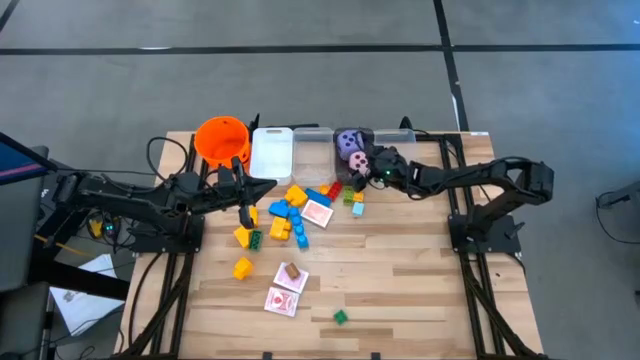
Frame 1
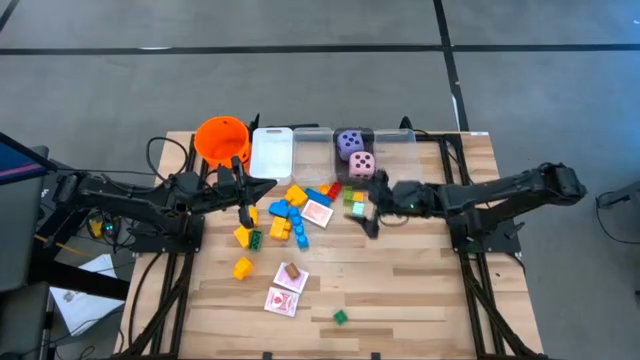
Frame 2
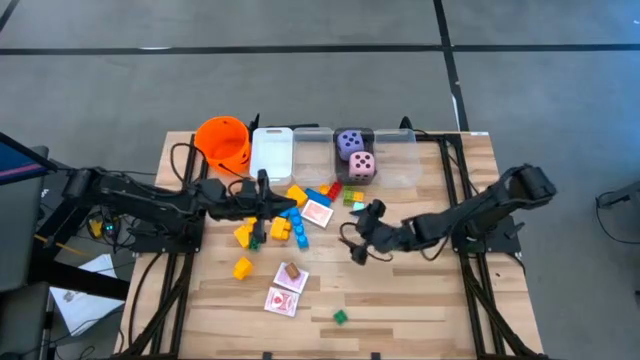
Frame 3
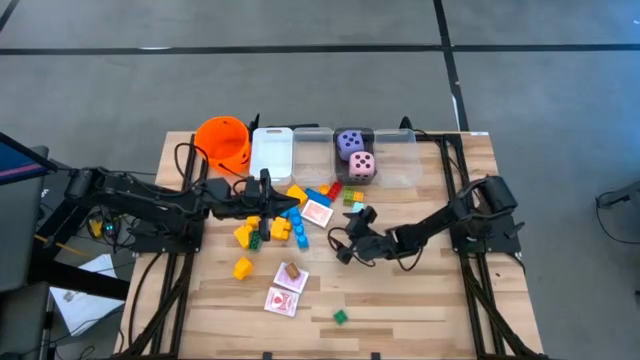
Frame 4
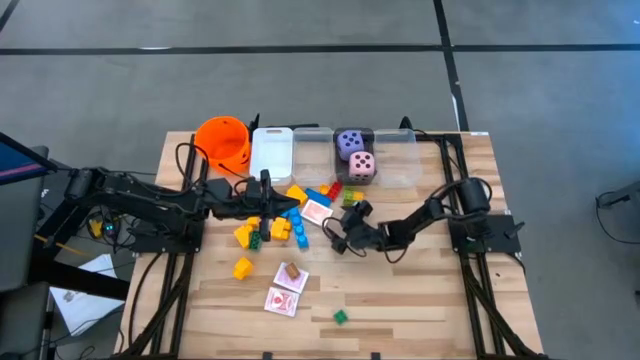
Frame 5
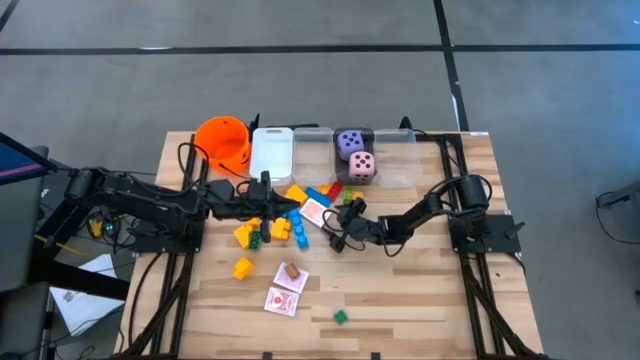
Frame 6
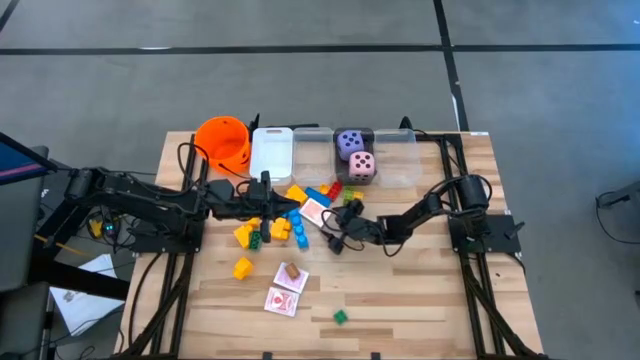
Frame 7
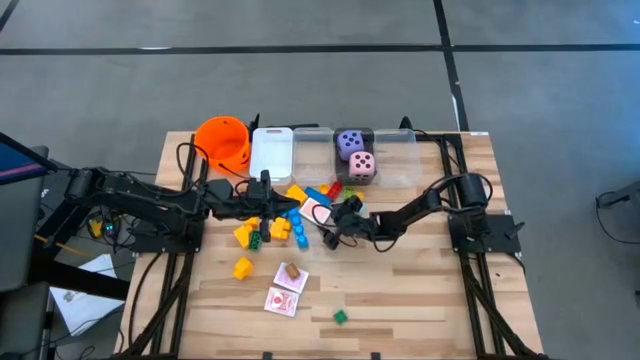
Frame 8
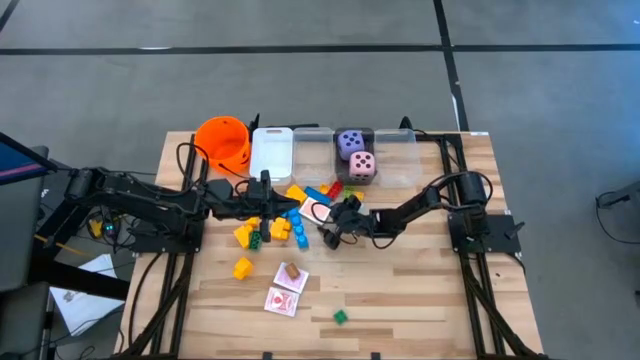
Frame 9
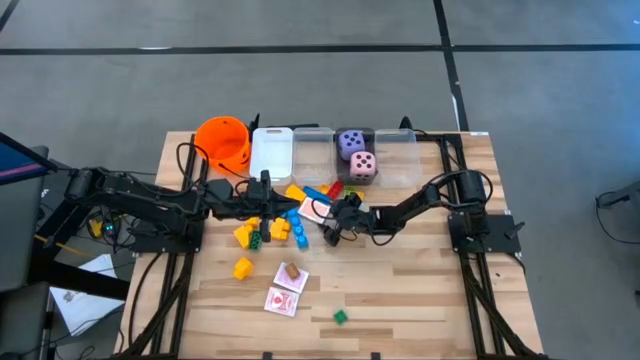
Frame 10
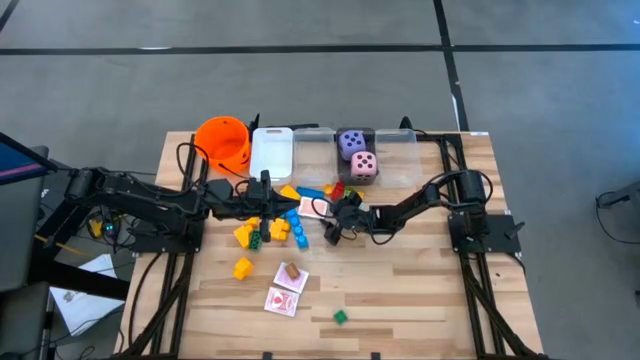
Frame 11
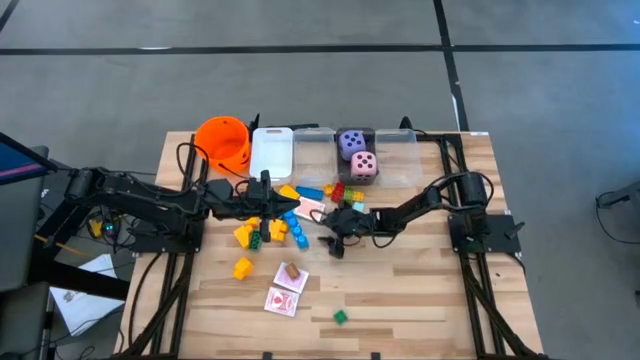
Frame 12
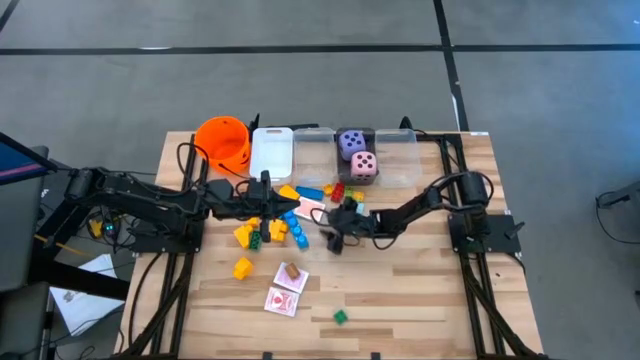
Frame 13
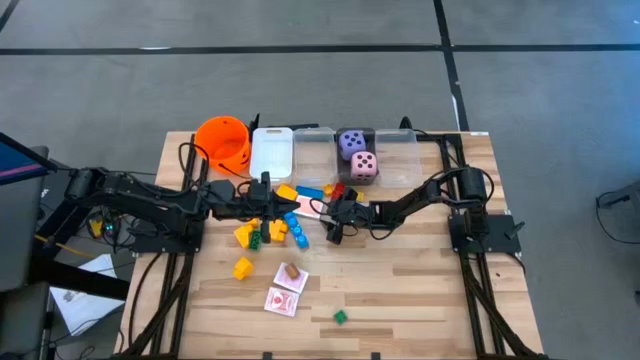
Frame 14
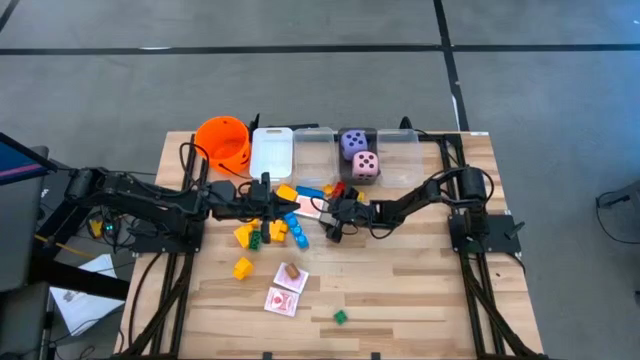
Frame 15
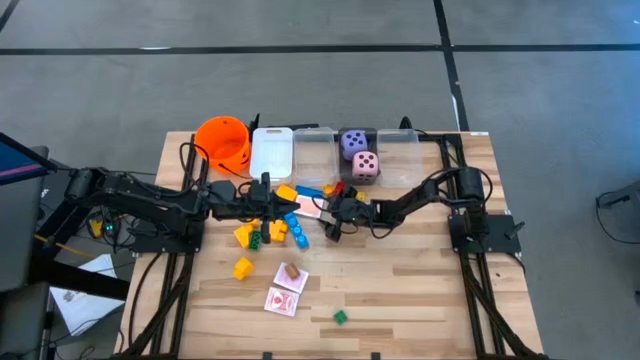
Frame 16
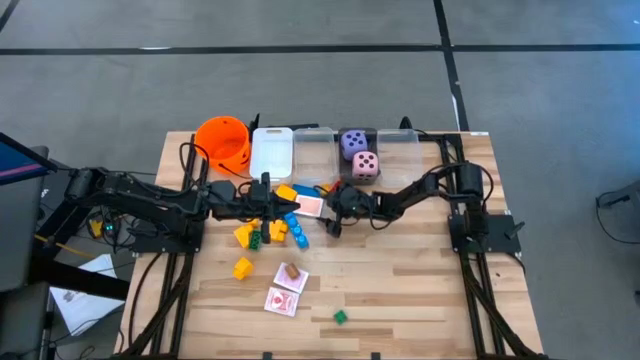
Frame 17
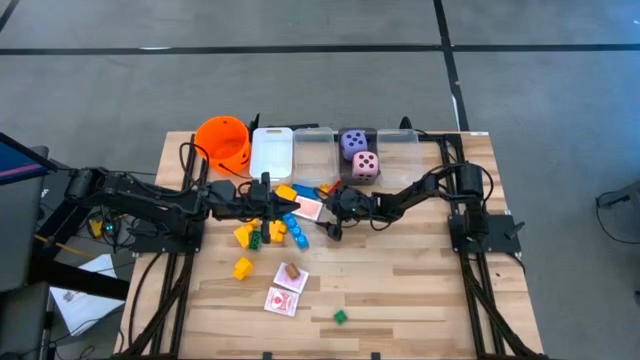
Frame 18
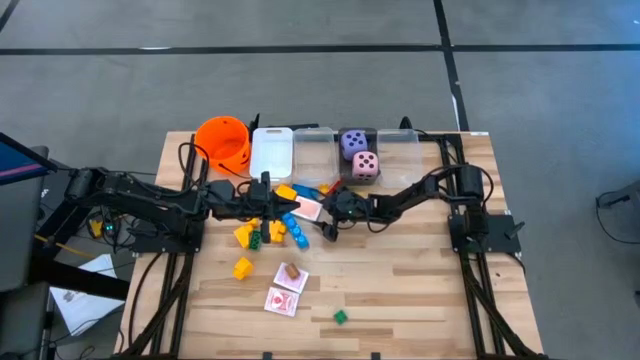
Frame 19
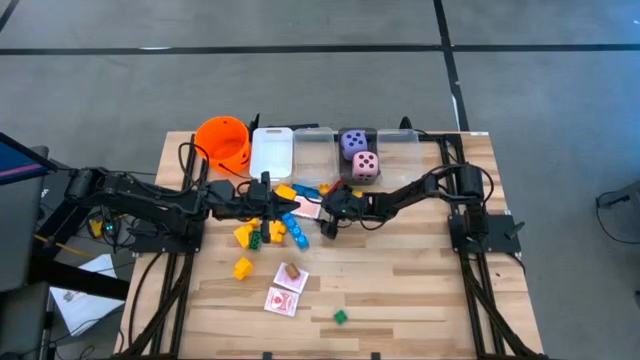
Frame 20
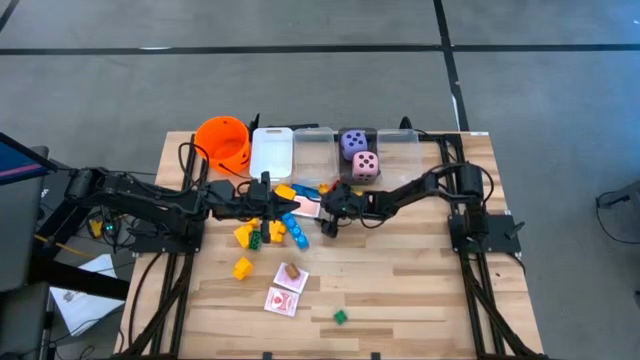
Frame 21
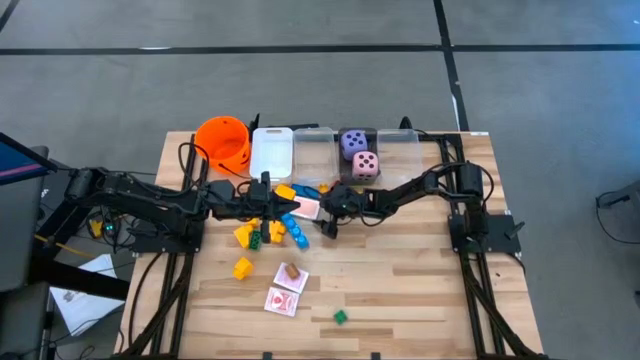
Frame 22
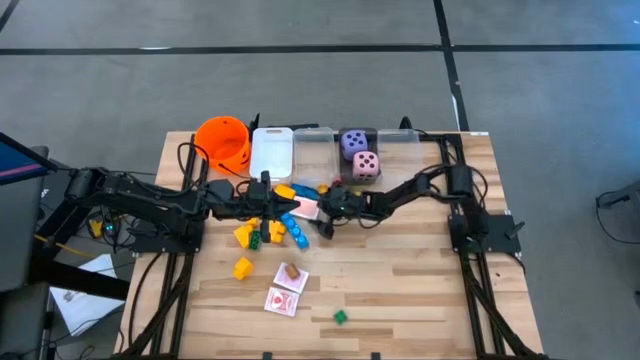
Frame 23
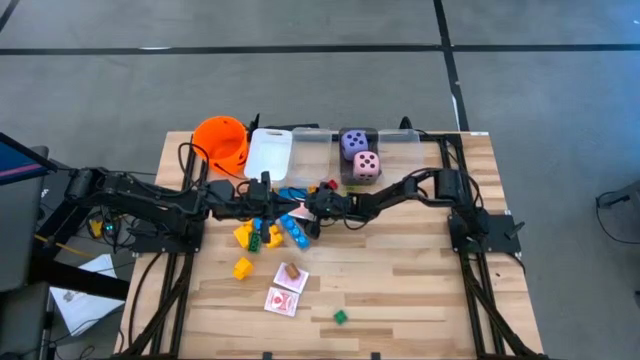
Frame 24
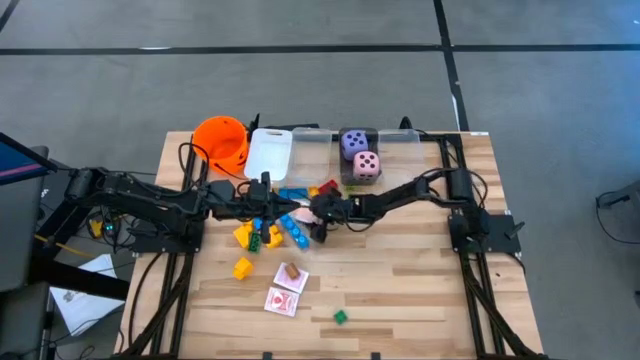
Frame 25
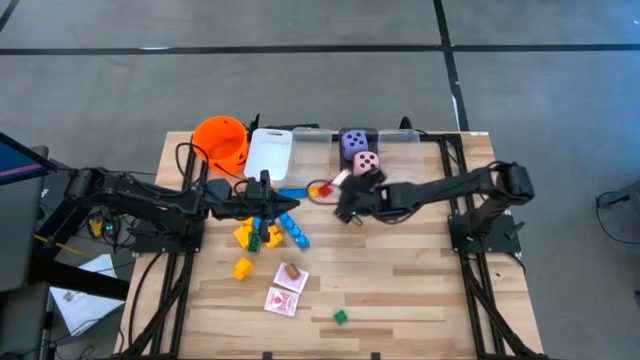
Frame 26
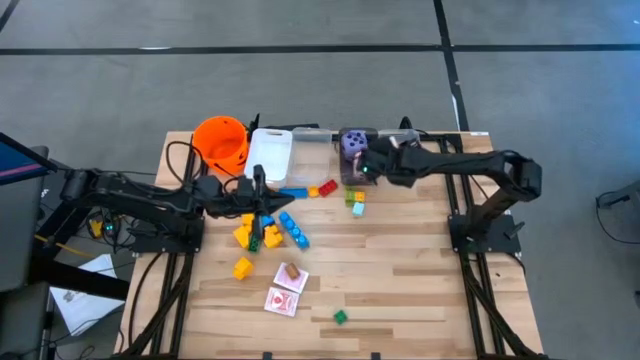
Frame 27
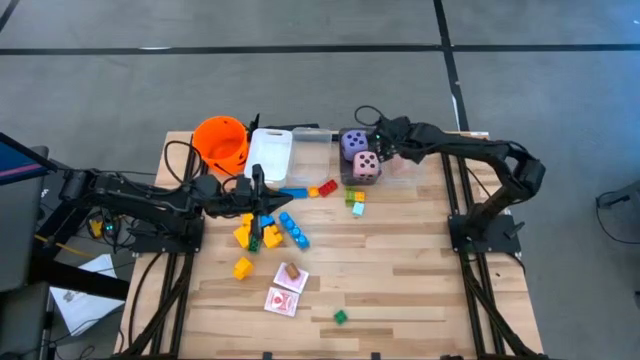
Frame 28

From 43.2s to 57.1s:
Task: Pick & Place Toys
Put the orange deck of cards into the right transparent bin

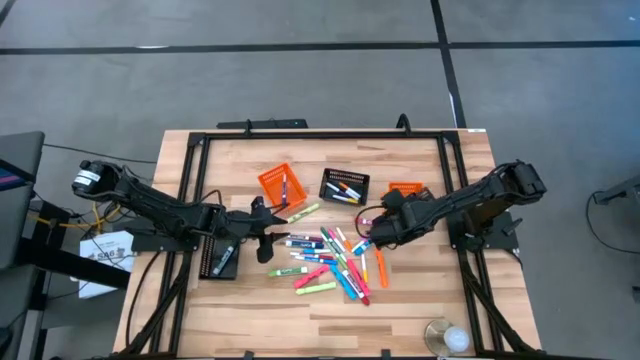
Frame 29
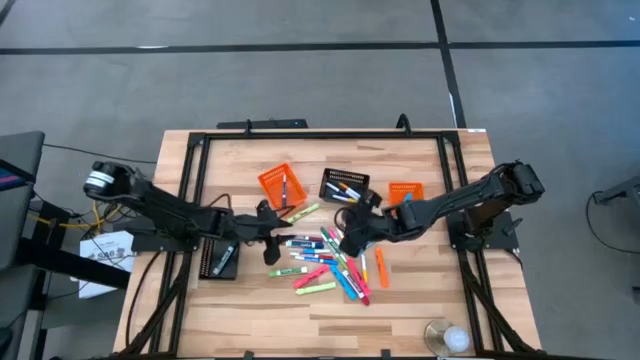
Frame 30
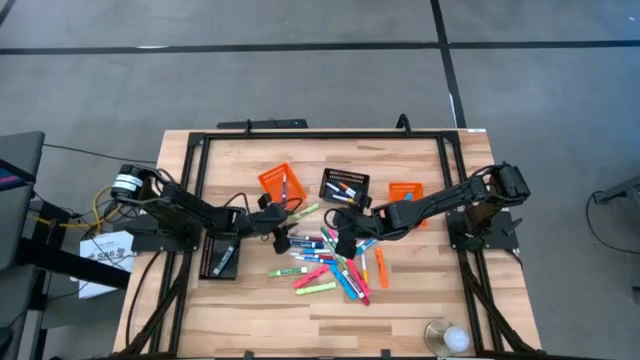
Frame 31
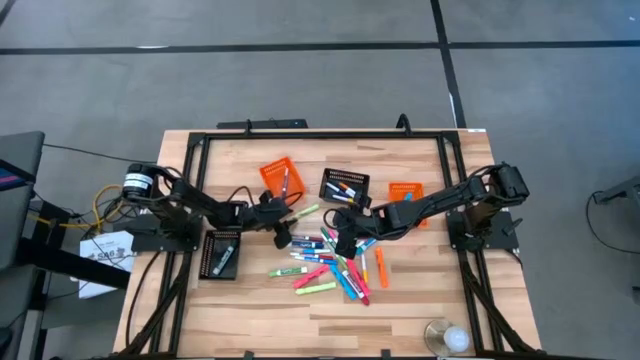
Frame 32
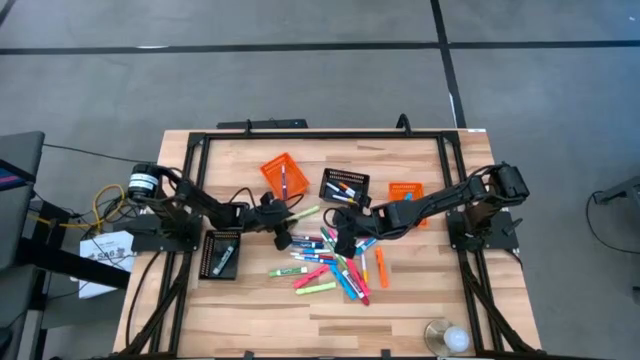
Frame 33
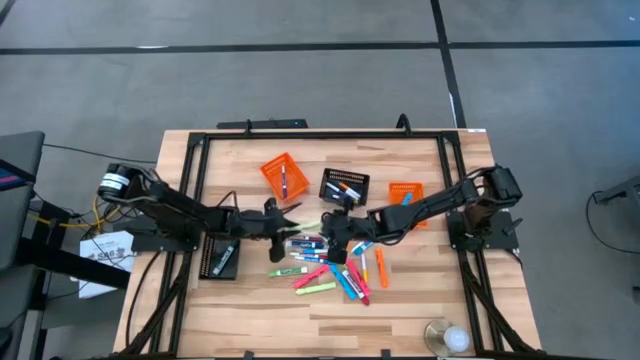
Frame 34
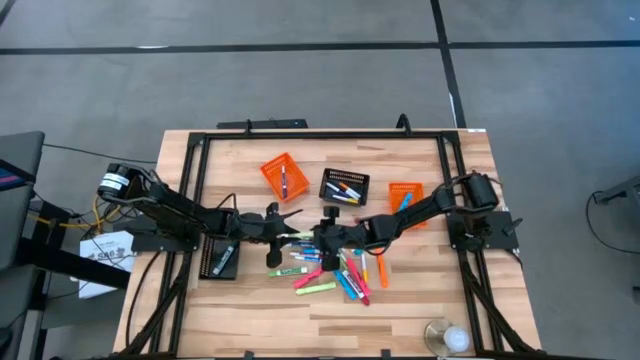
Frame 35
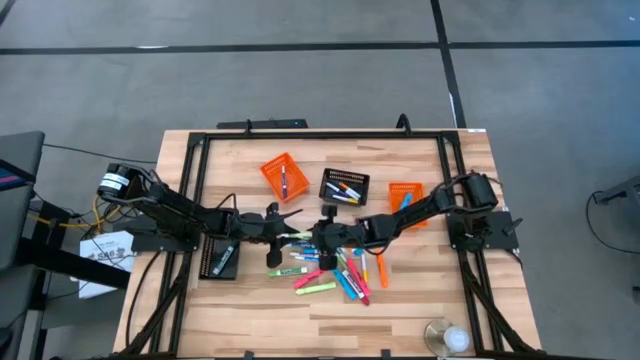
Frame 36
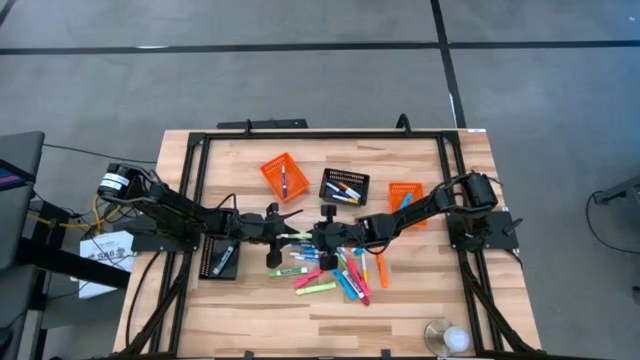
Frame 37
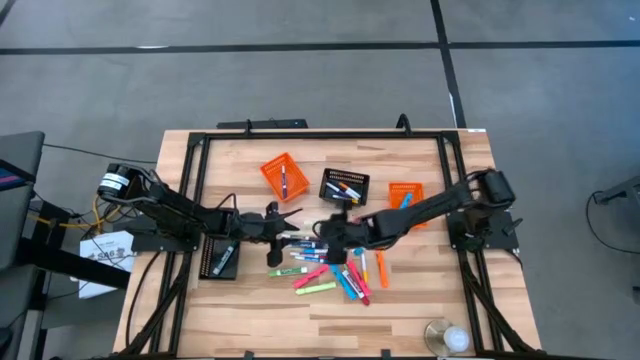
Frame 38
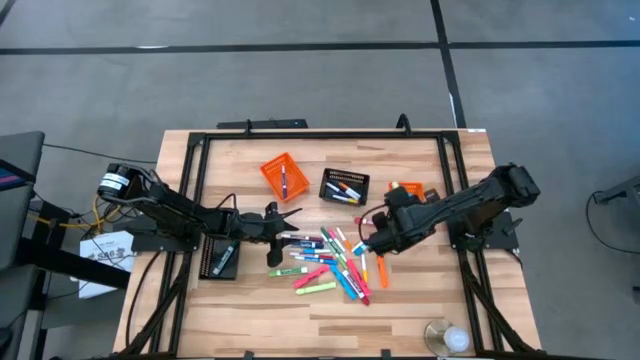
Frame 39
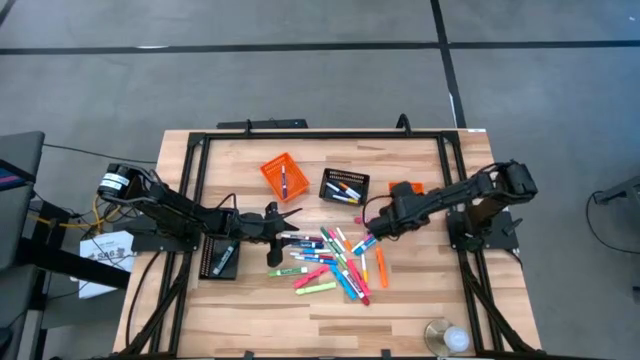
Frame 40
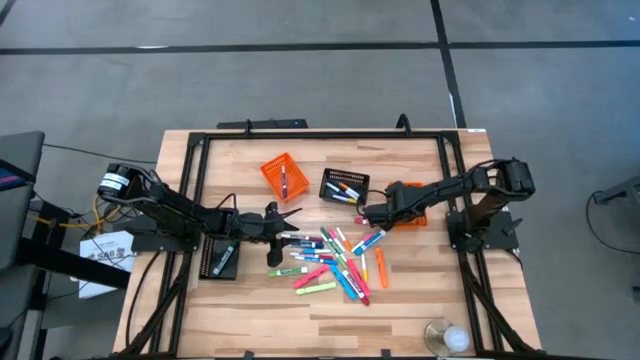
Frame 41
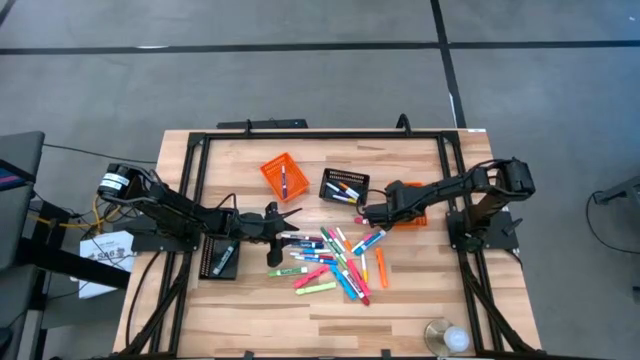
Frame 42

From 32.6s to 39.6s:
Task: Pick & Place Markers
Put the light green highlighter into the right orange bin

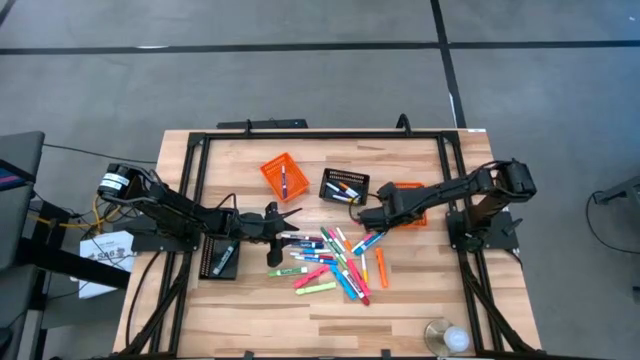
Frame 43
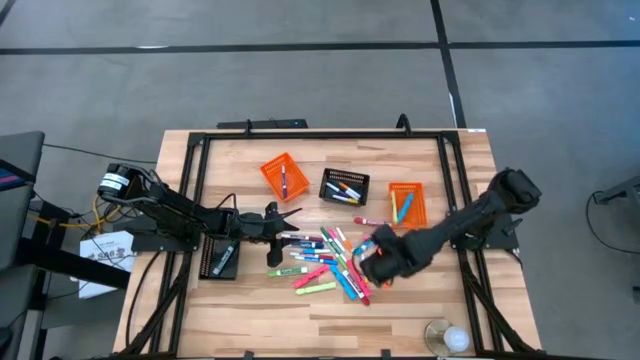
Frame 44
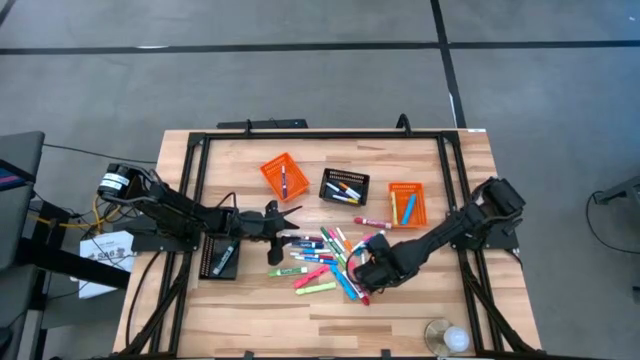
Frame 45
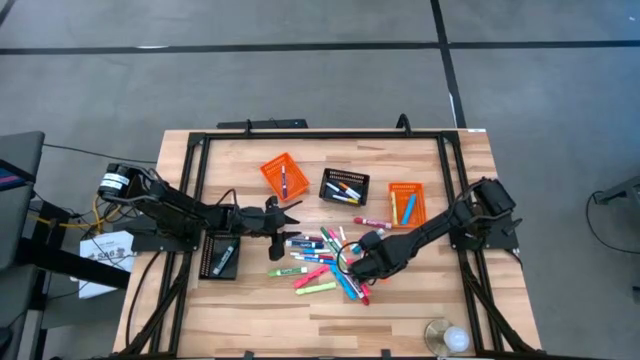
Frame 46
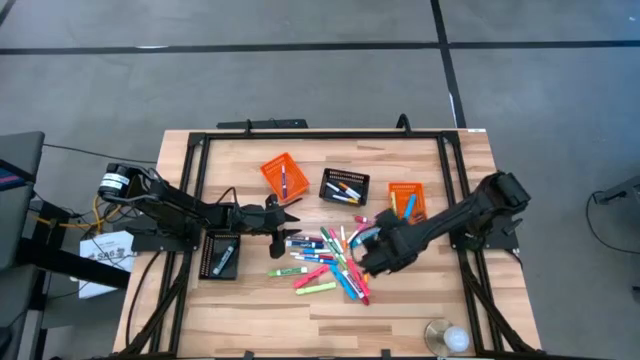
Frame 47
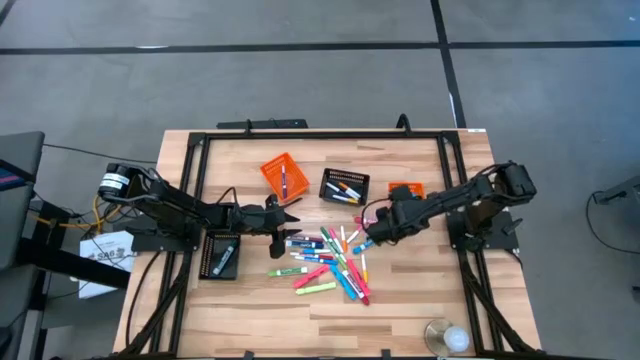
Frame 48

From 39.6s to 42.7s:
Put the orange highlighter into the right orange bin
